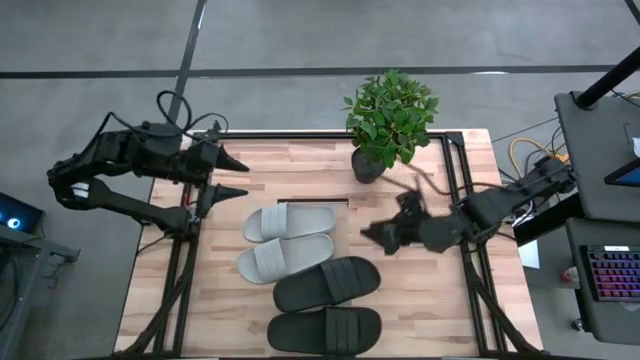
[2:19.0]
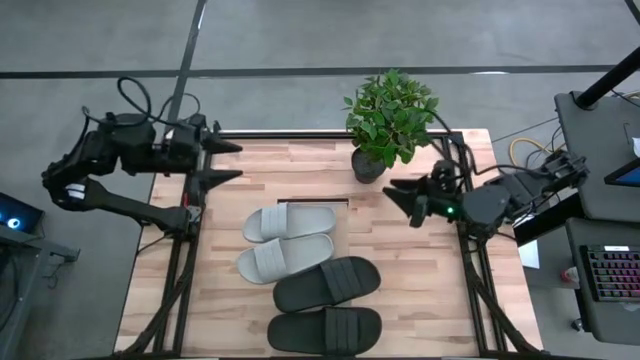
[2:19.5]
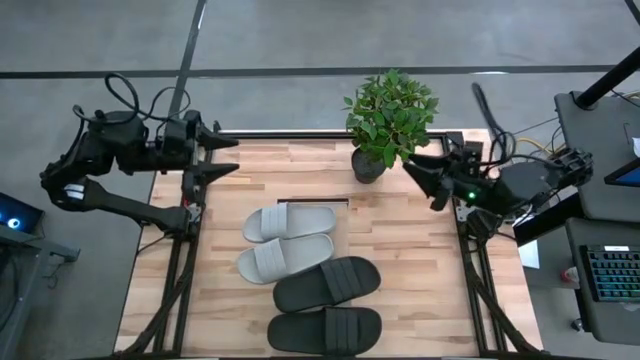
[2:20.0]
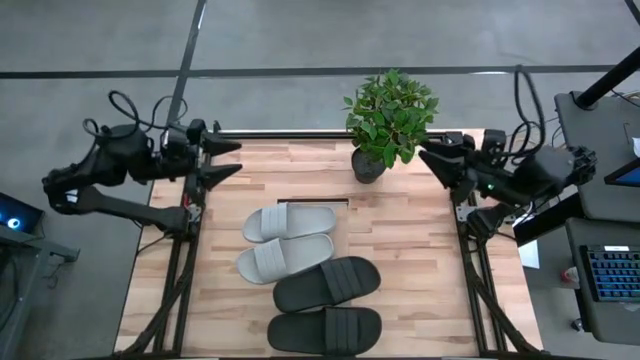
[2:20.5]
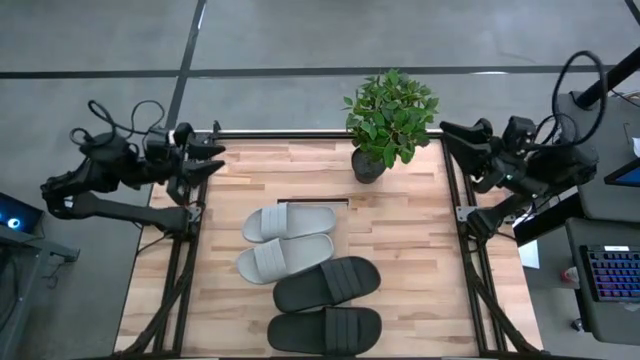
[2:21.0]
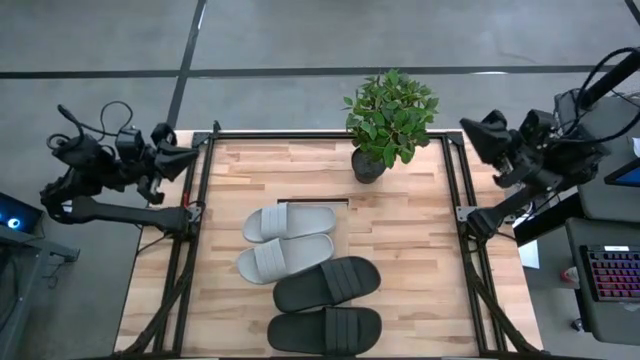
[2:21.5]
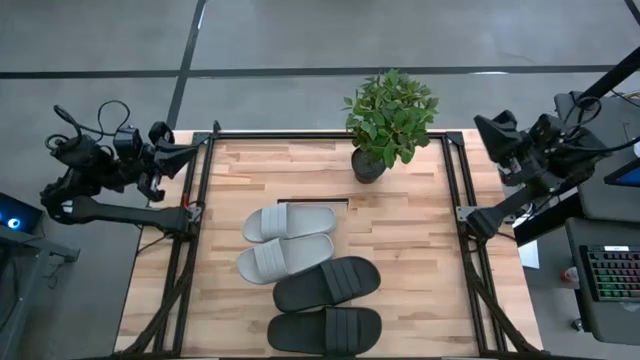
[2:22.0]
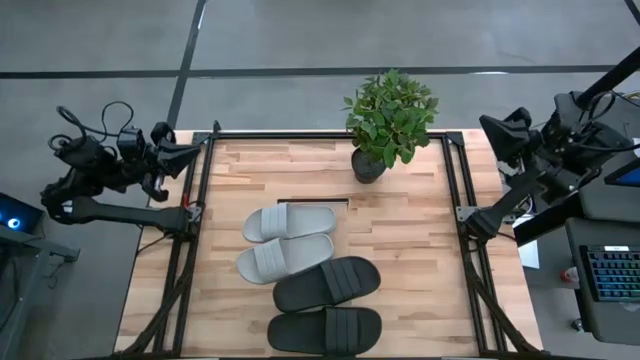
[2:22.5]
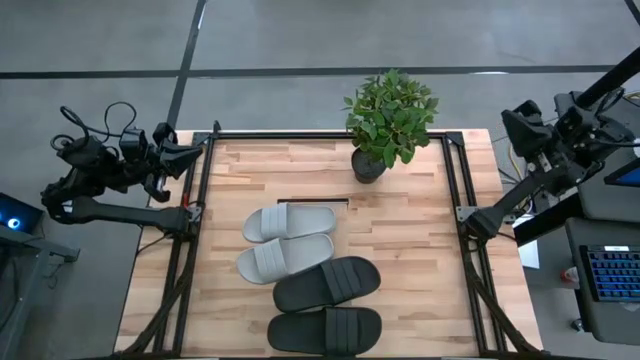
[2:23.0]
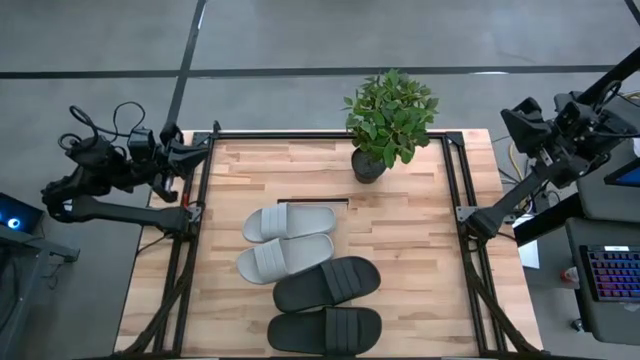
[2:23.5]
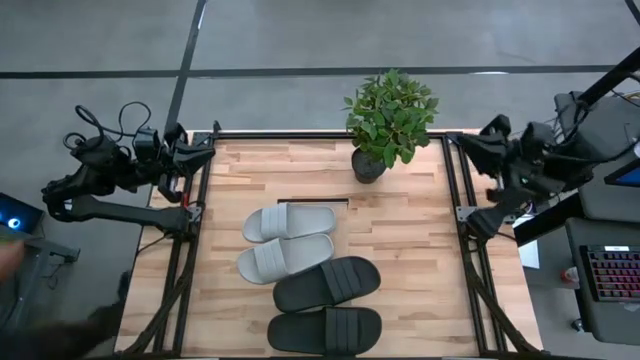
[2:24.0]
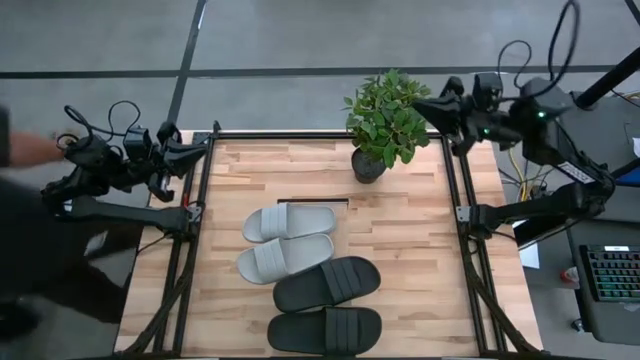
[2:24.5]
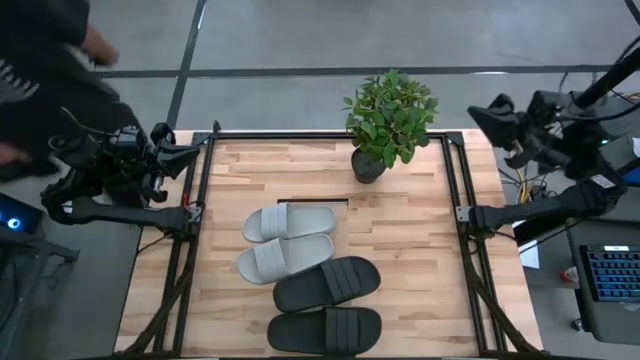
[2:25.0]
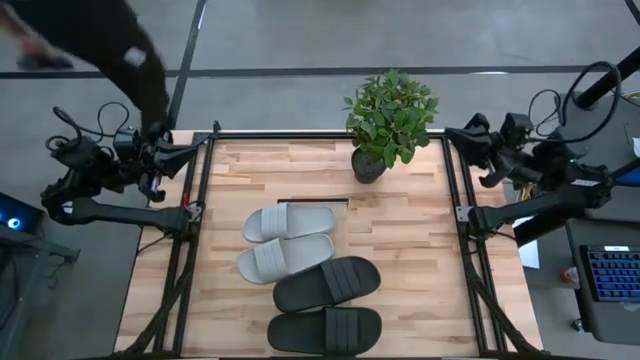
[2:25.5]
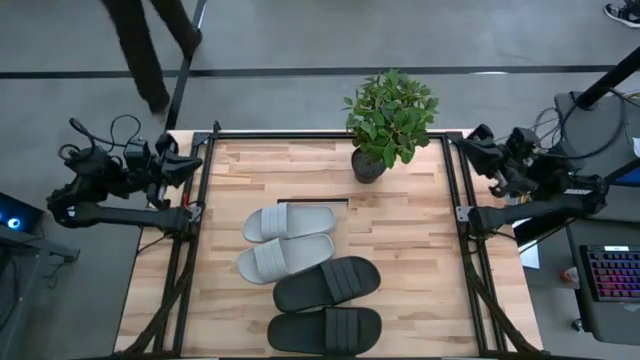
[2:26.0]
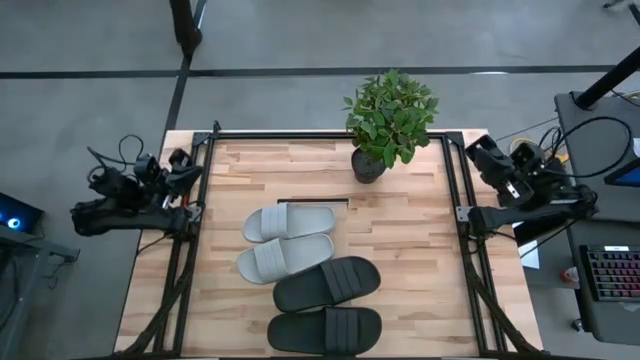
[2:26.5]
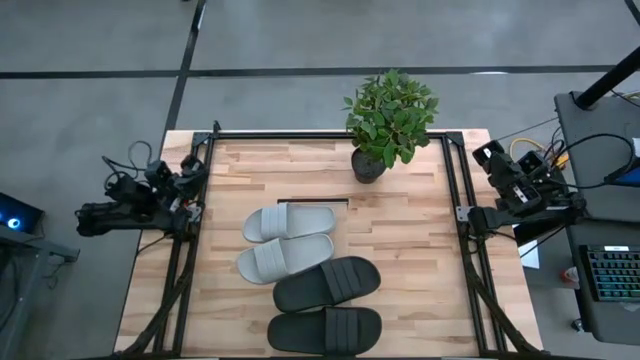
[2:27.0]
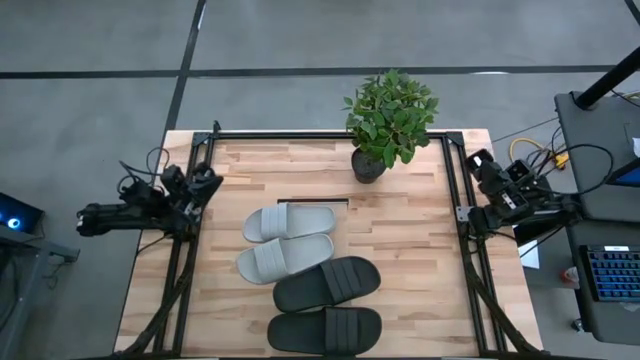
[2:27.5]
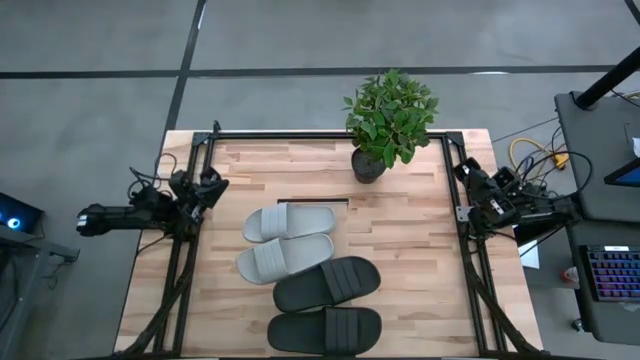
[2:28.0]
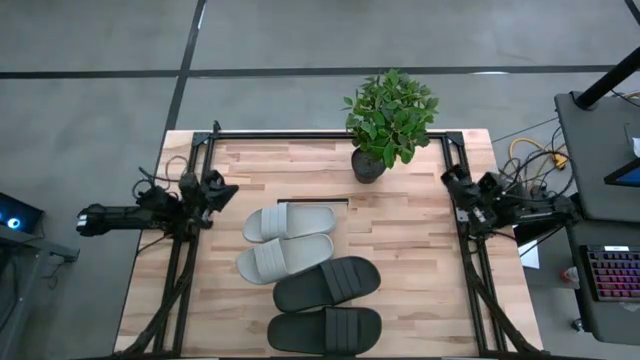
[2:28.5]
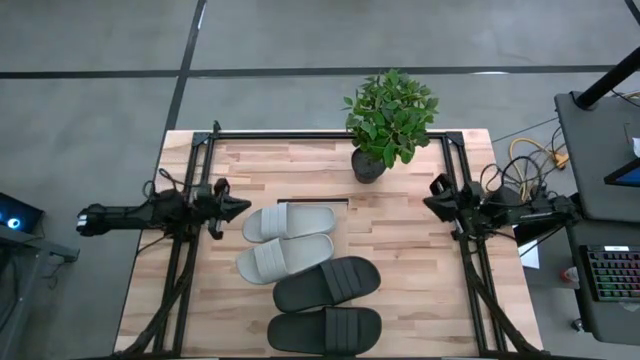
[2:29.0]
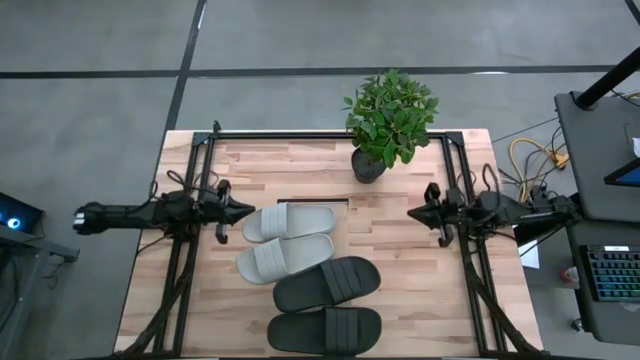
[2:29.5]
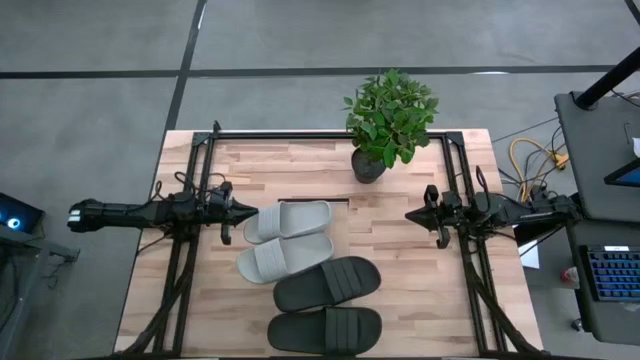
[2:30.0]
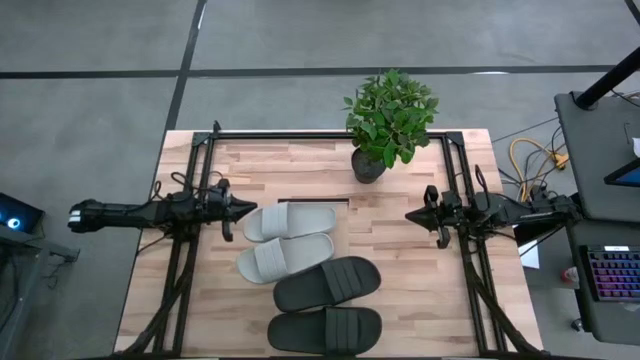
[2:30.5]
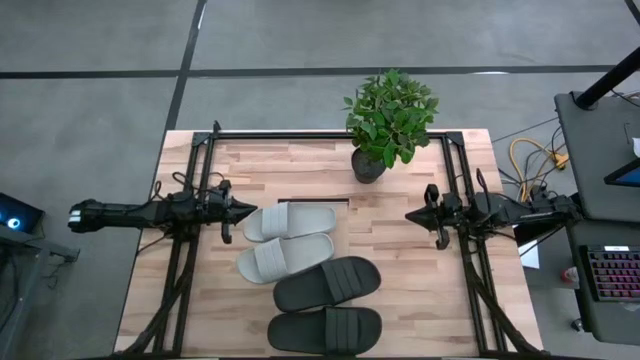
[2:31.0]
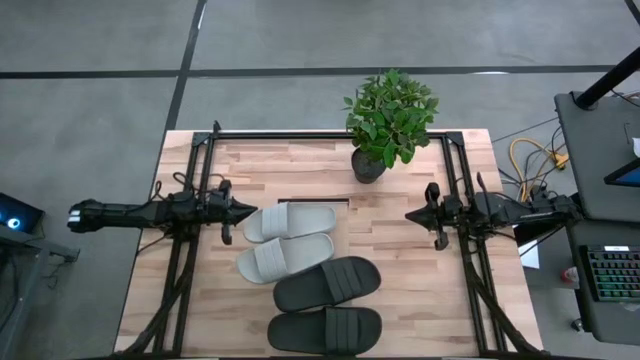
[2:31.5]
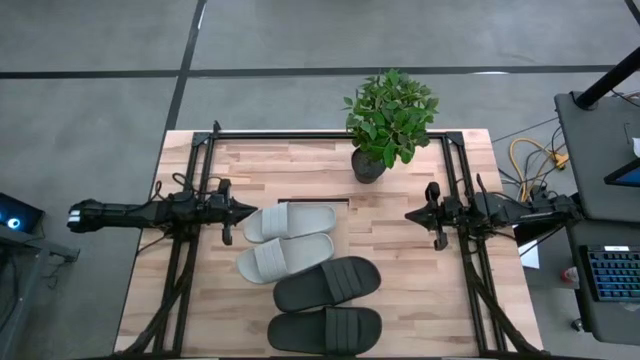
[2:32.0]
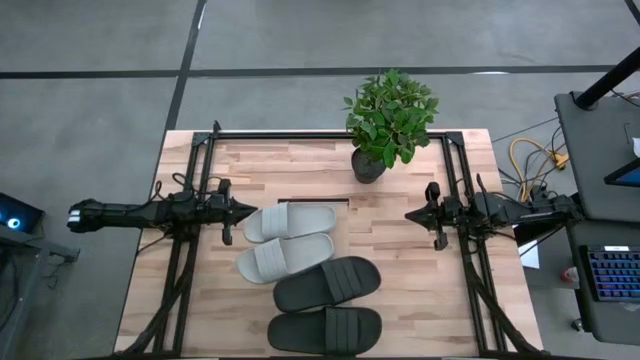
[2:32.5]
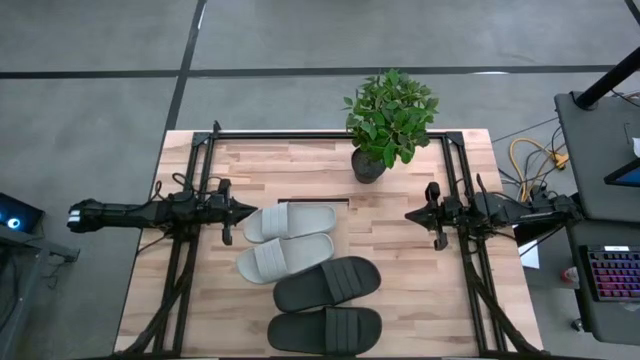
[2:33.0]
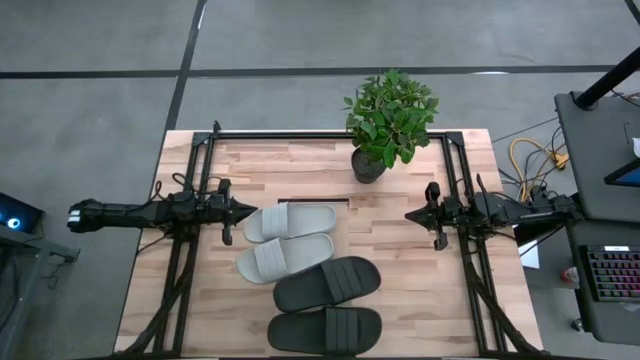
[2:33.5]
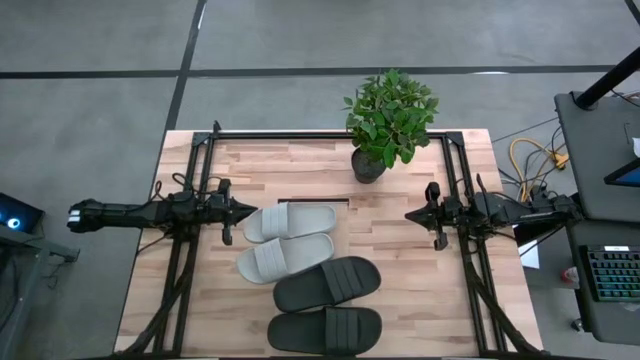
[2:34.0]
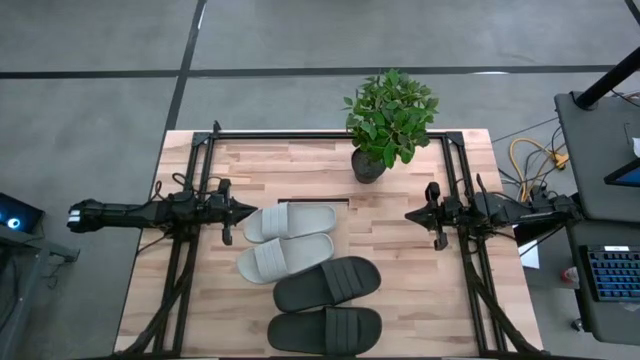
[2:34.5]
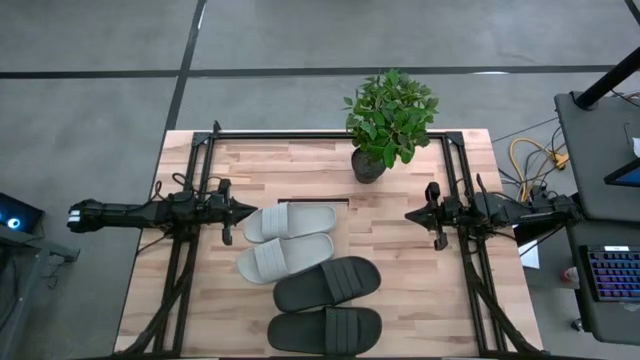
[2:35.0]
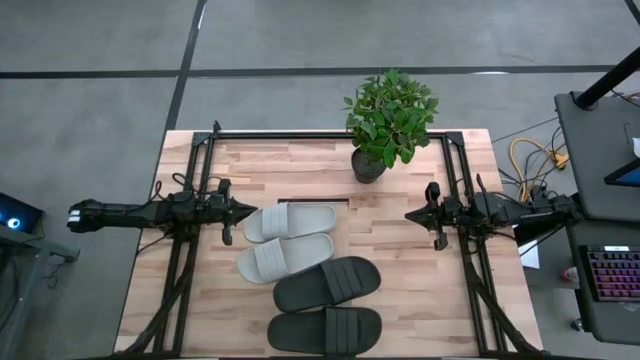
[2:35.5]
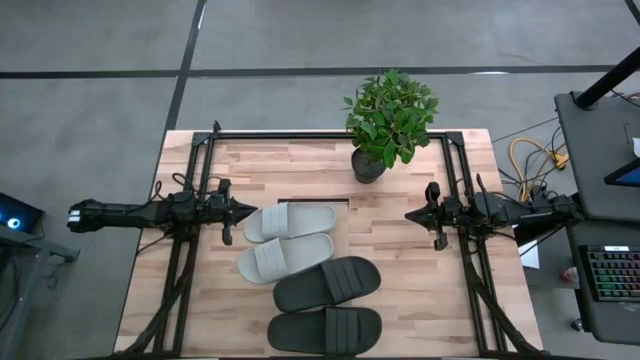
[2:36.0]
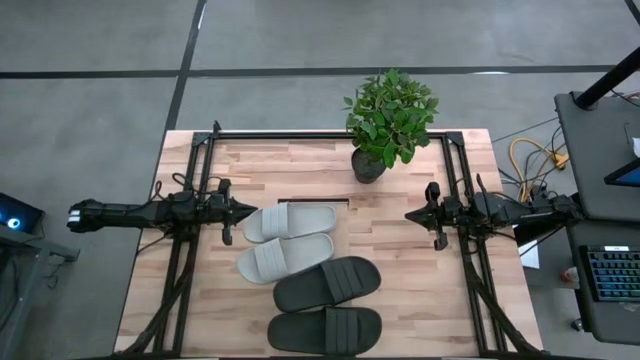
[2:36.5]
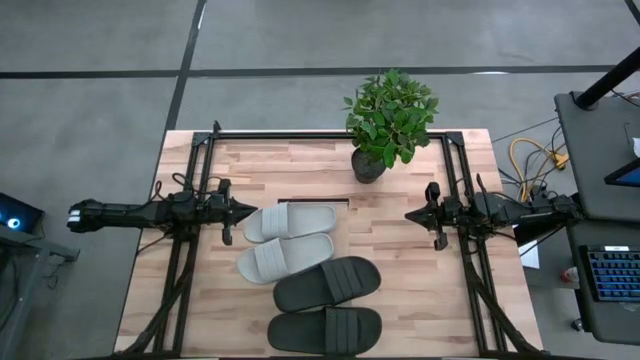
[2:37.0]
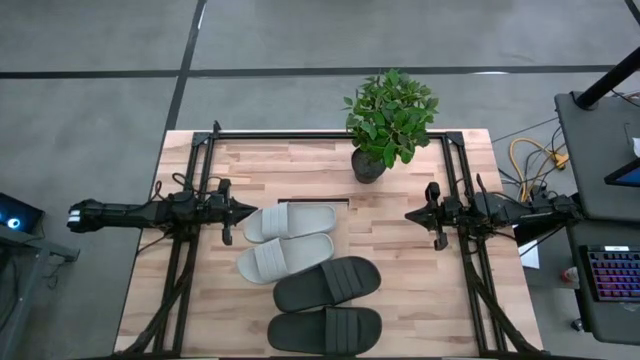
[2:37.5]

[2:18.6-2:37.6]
Task: Pick and place slides into the shelf
Return to Home Position
